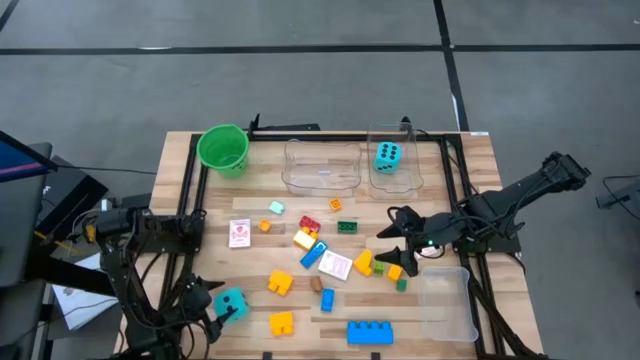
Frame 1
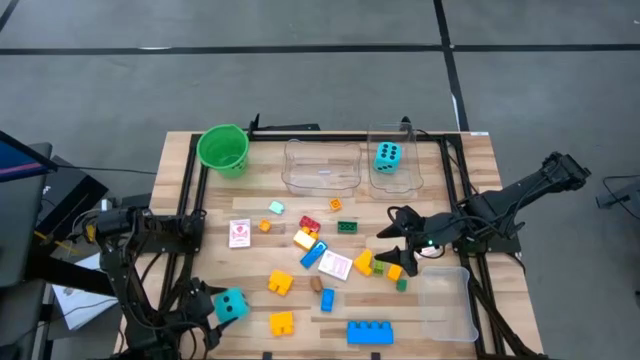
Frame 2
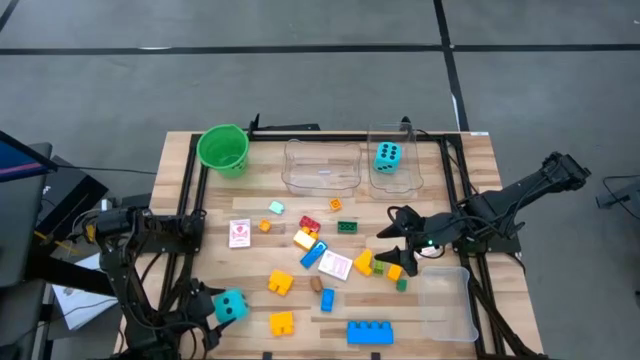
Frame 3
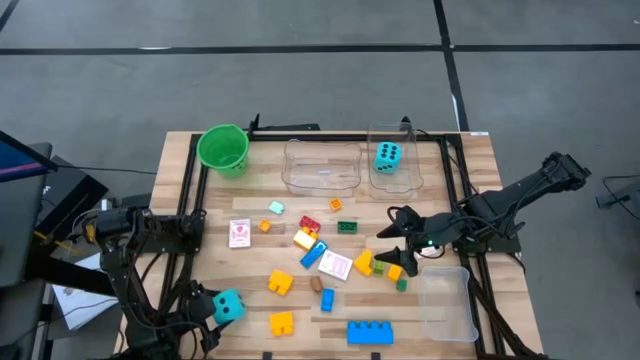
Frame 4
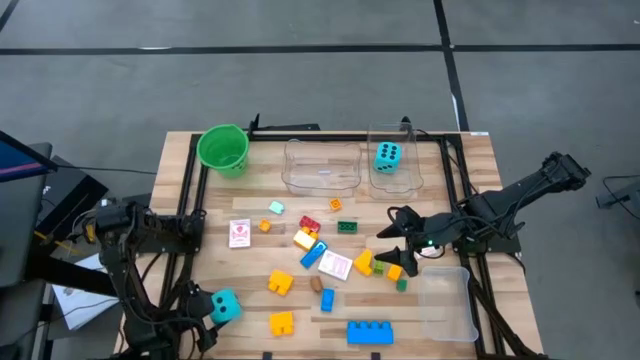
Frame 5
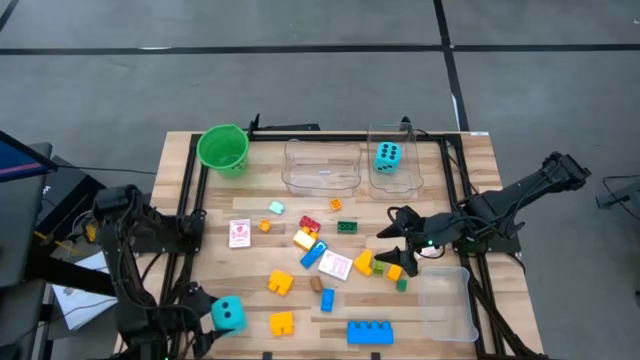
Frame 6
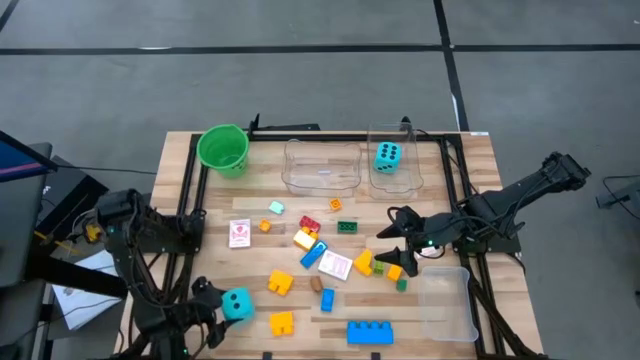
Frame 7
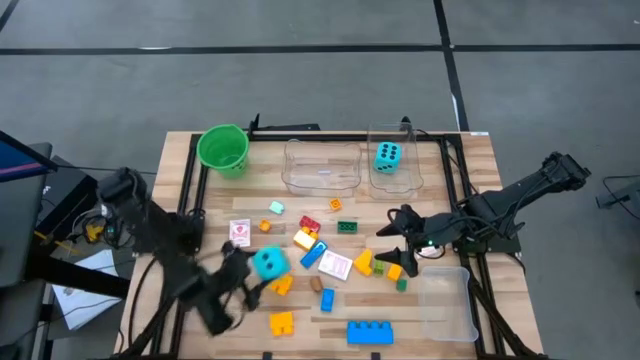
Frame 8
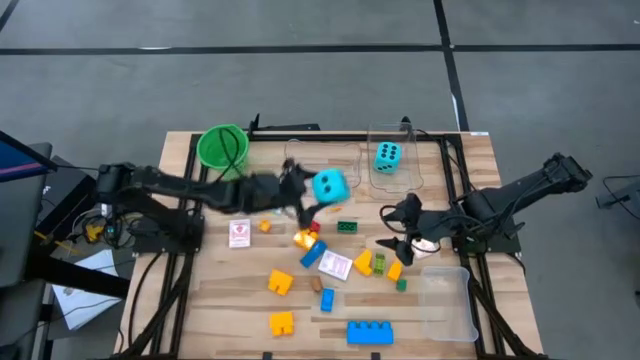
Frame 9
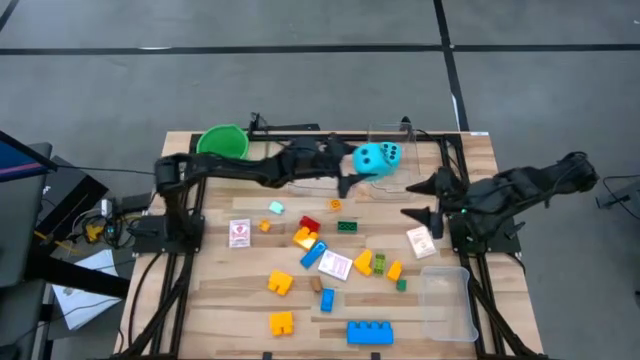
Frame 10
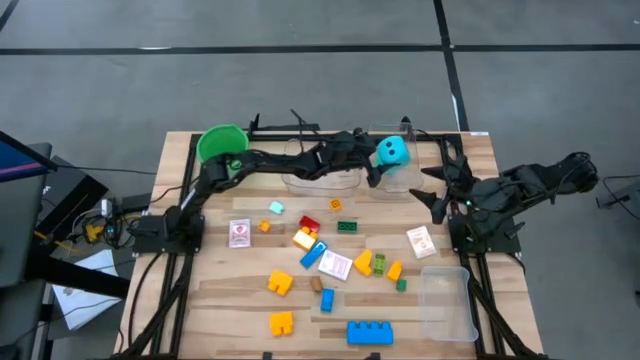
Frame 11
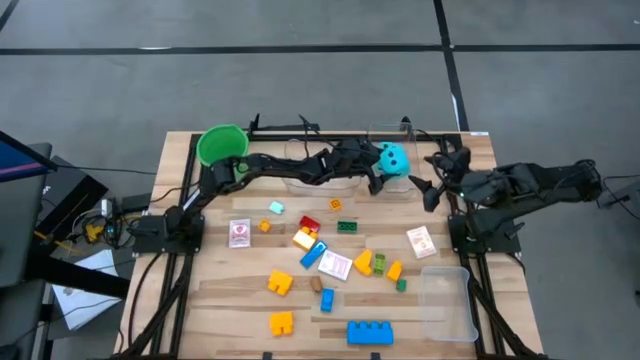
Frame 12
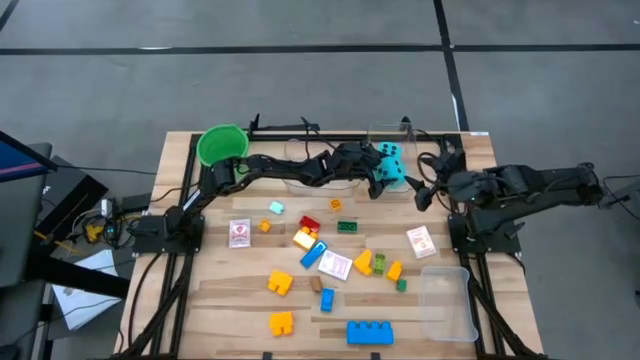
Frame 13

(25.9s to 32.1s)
Task: Pick & Place Toys
Put the blue dice into the right transparent bin

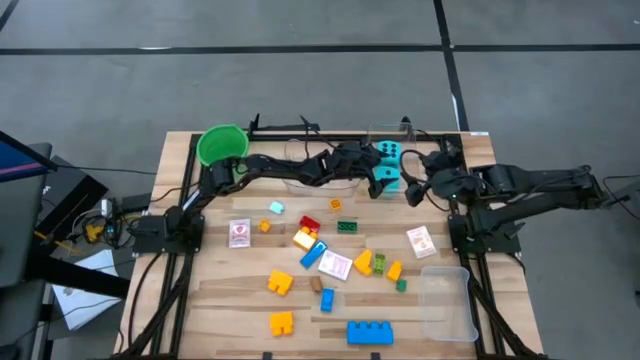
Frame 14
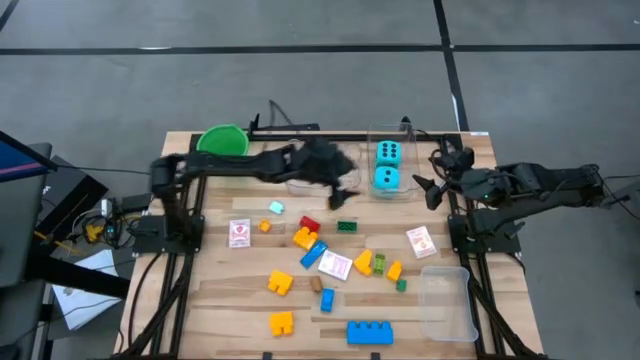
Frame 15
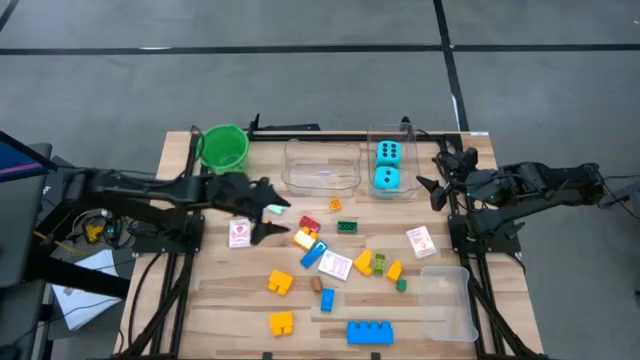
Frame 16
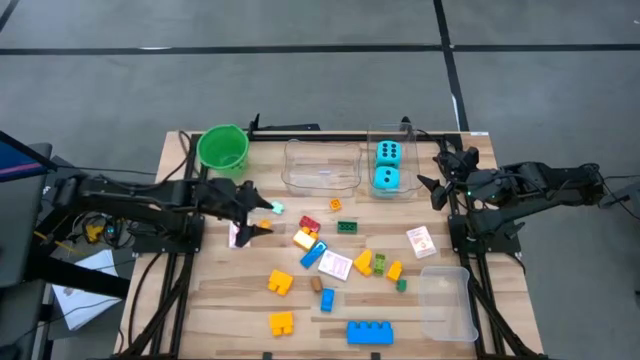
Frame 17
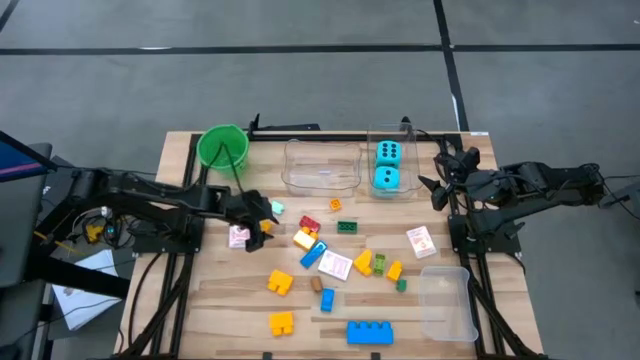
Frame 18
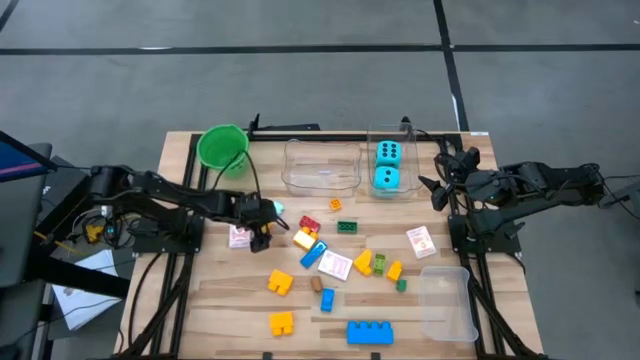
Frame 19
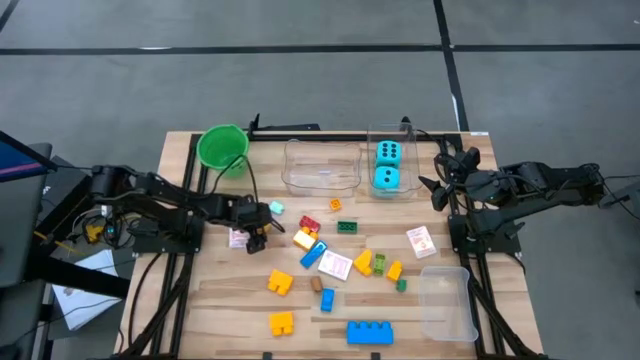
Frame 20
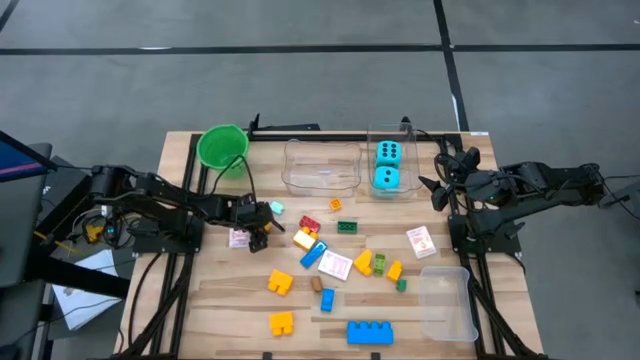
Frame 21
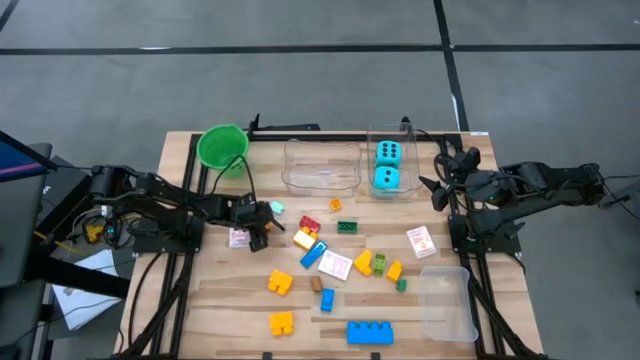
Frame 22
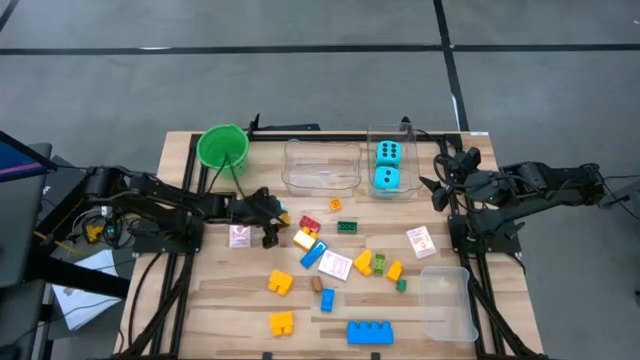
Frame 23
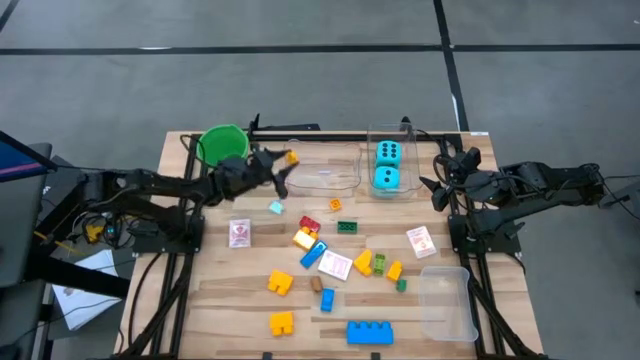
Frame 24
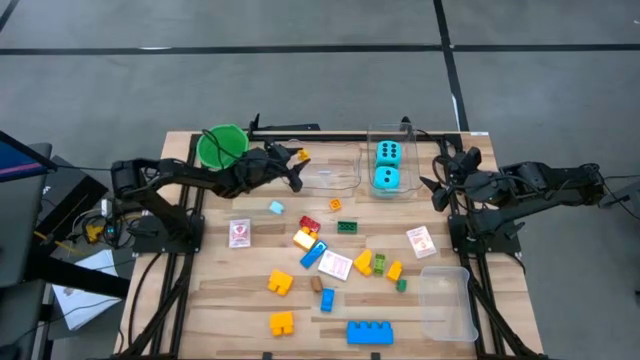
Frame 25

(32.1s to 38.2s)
Put the small yellow gamepiece into the left transparent bin

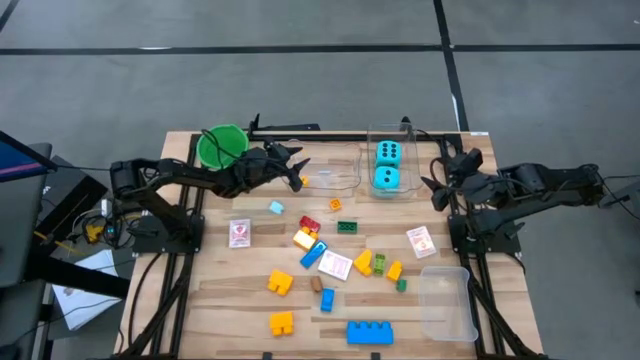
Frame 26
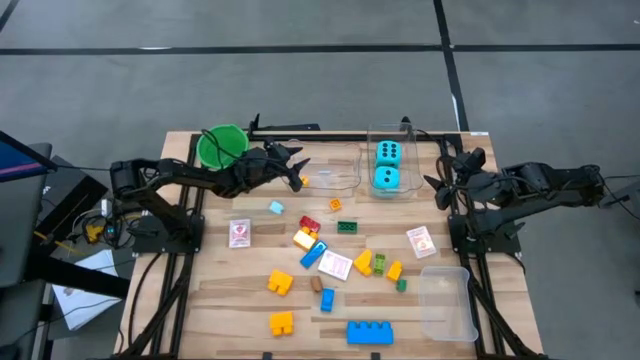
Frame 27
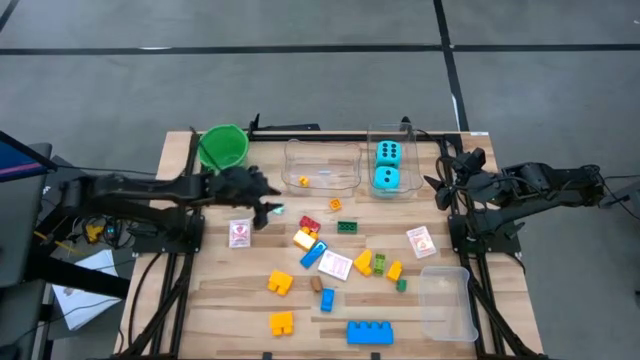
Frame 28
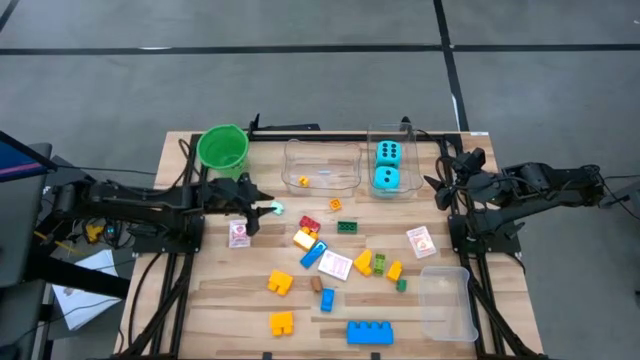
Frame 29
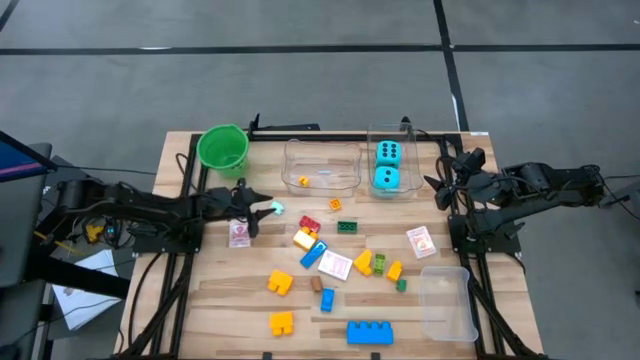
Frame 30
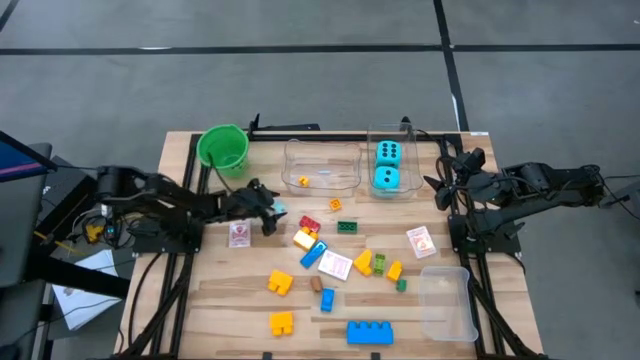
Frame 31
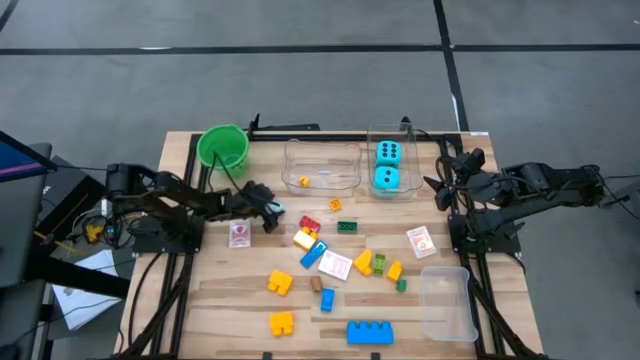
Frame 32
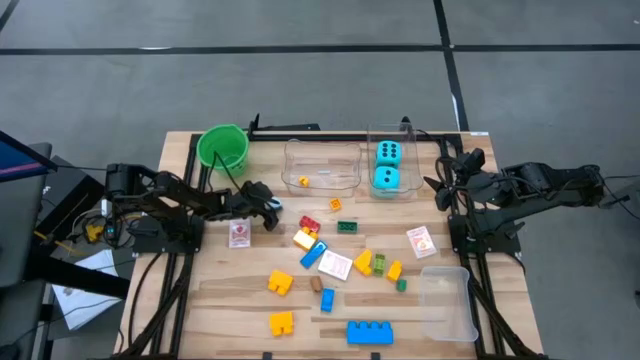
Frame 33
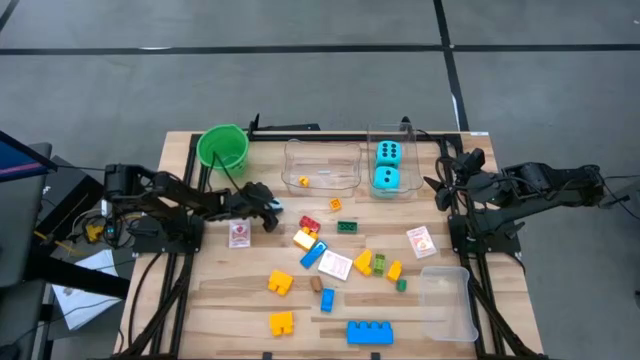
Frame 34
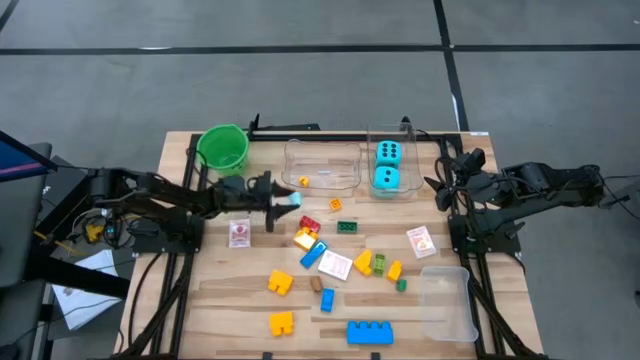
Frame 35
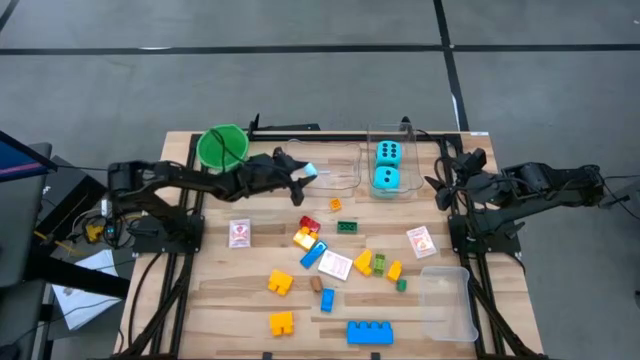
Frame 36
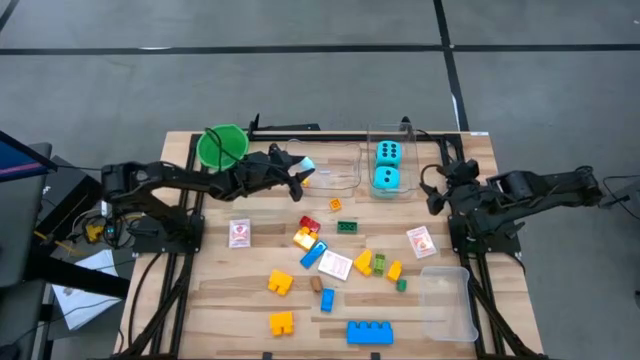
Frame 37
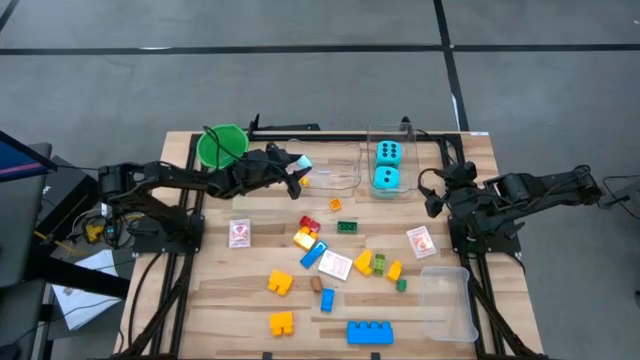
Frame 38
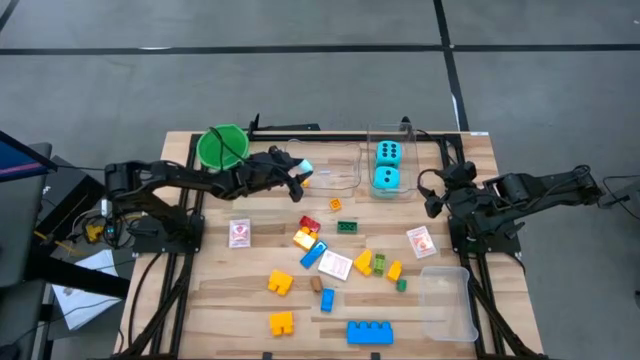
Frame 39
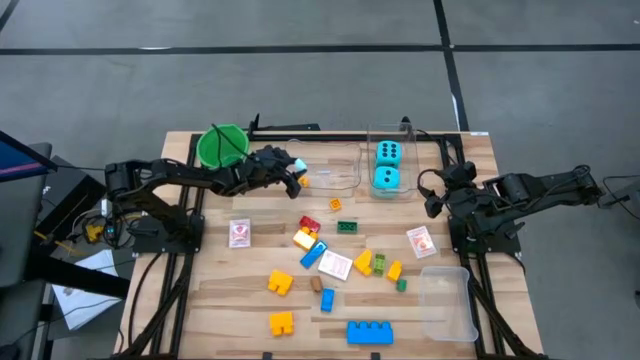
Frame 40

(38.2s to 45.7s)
Put the light blue gamepiece into the left transparent bin
